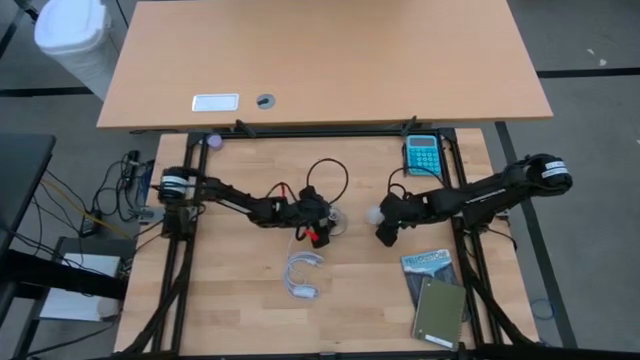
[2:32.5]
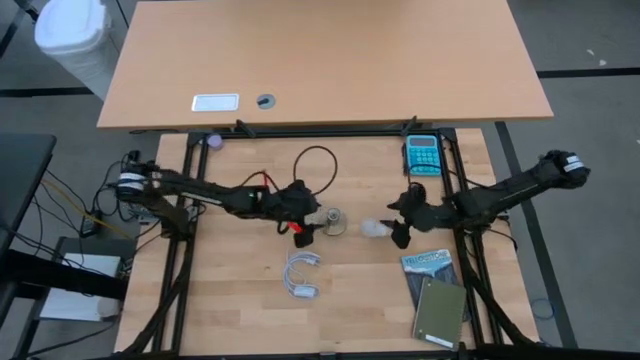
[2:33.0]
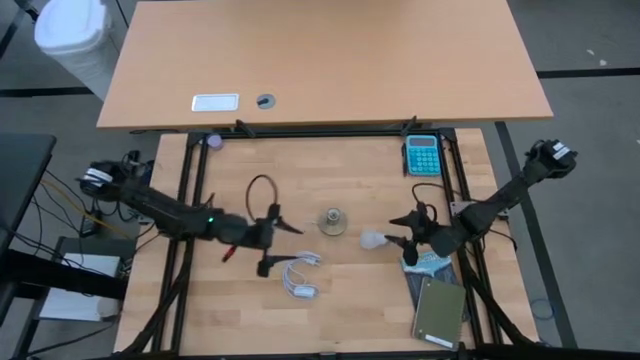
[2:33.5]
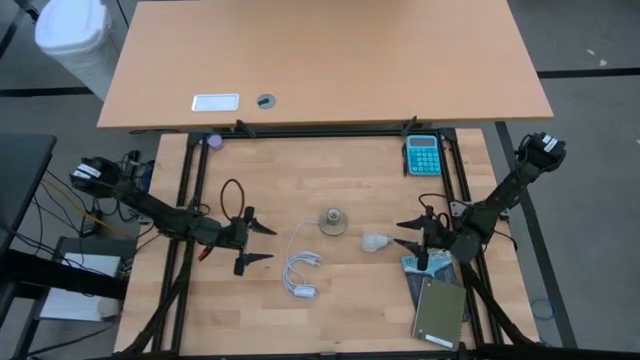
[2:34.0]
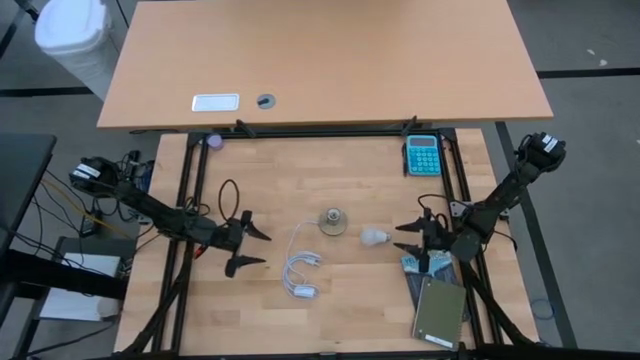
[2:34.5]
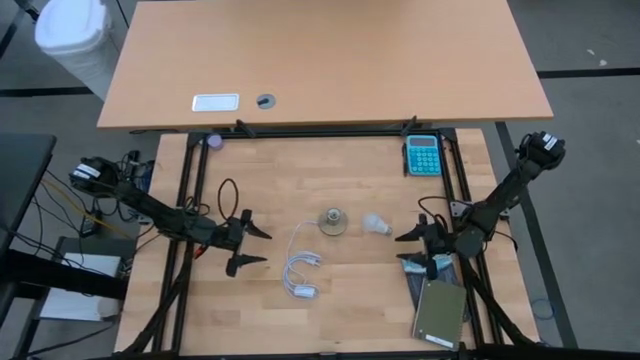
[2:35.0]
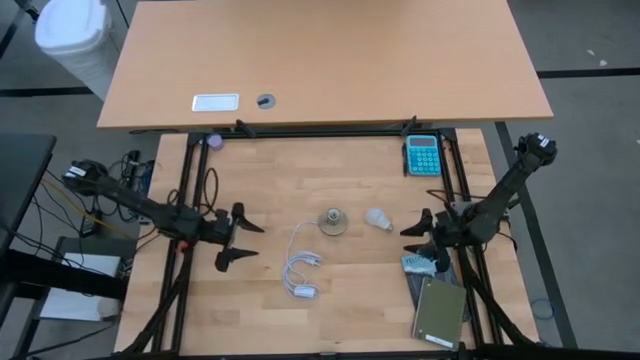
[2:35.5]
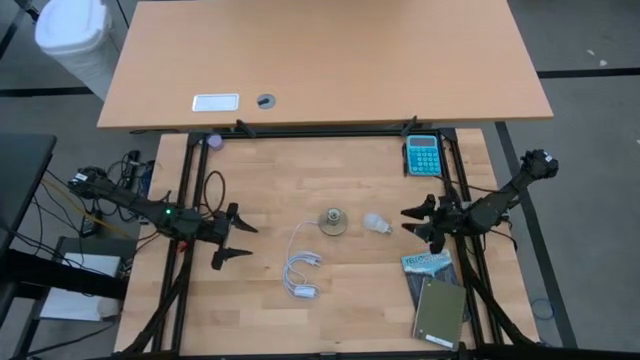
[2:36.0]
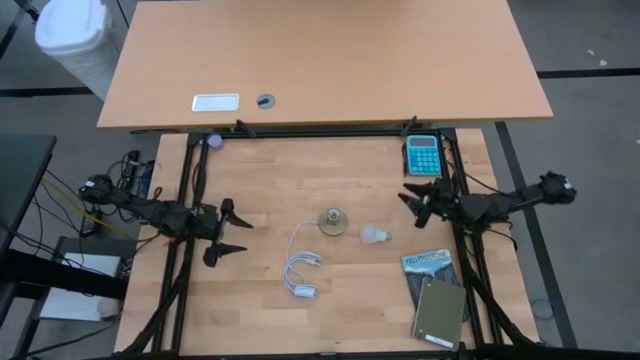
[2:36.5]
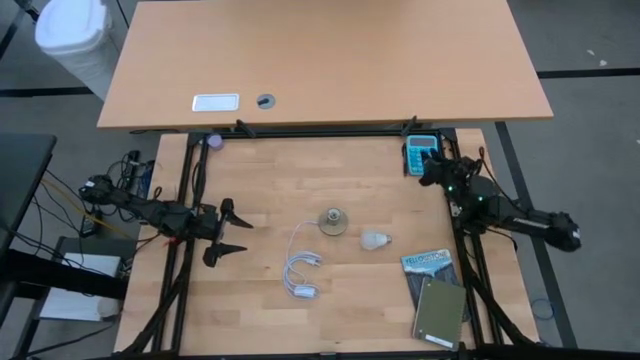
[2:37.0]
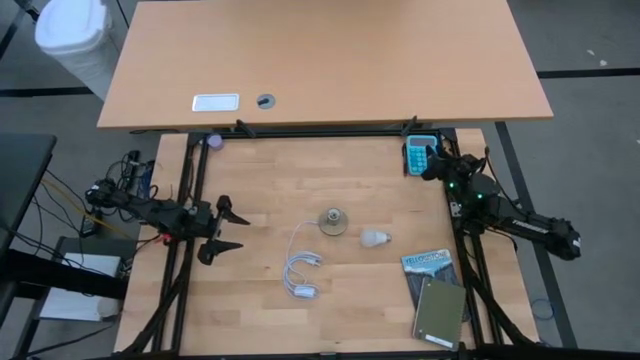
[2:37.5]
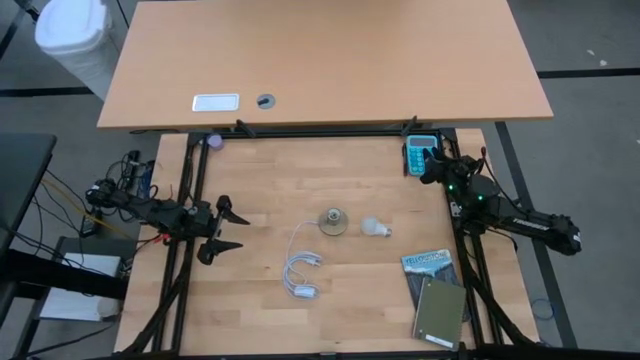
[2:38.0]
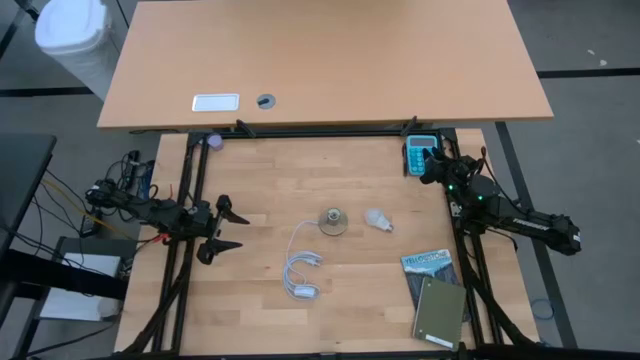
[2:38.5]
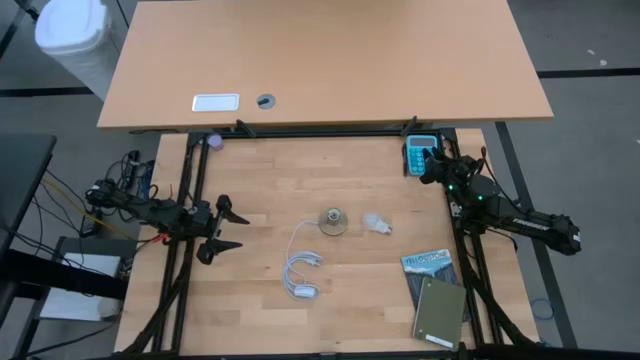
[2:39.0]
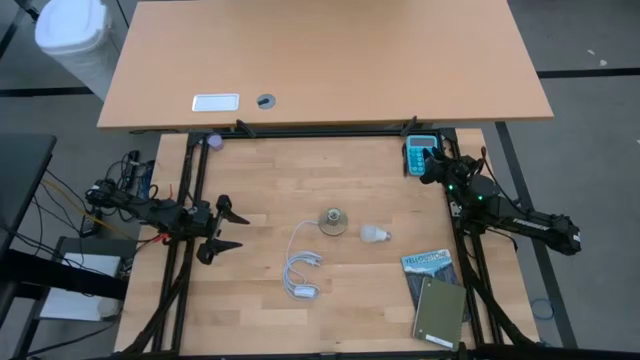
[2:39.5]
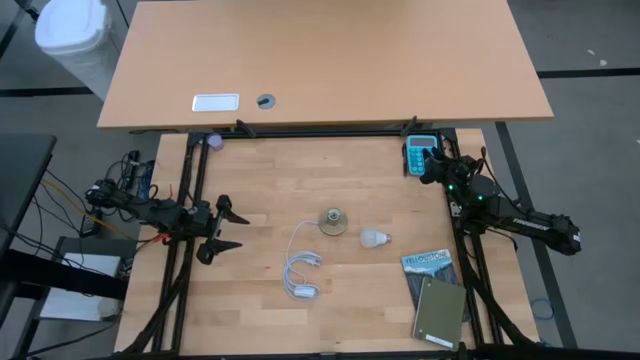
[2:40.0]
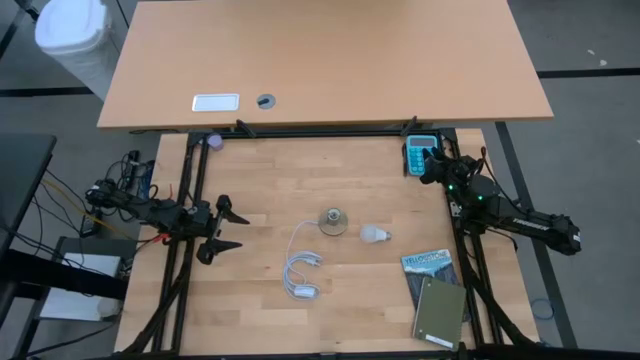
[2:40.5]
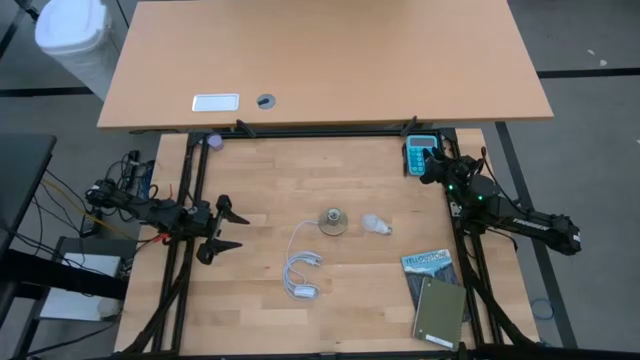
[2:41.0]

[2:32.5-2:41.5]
Task: Screw lightbulb
Return to Home Position

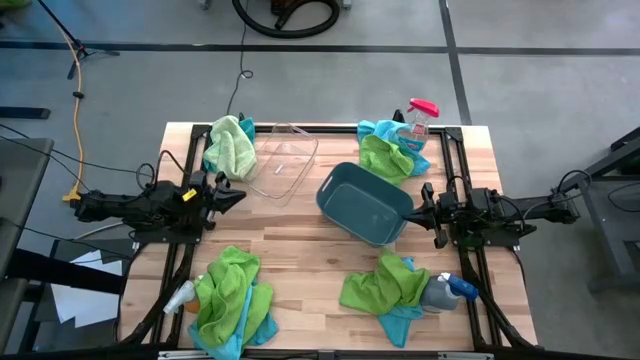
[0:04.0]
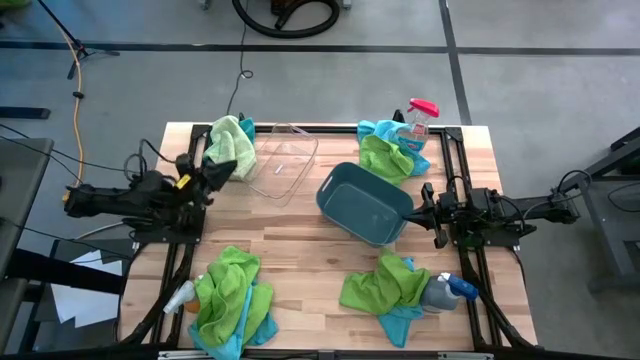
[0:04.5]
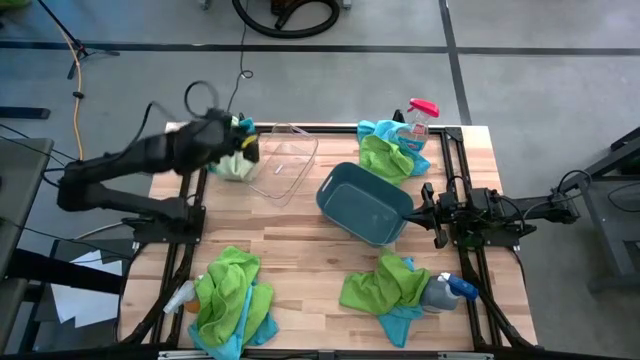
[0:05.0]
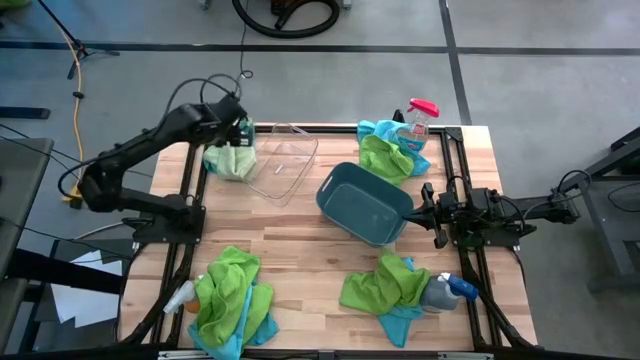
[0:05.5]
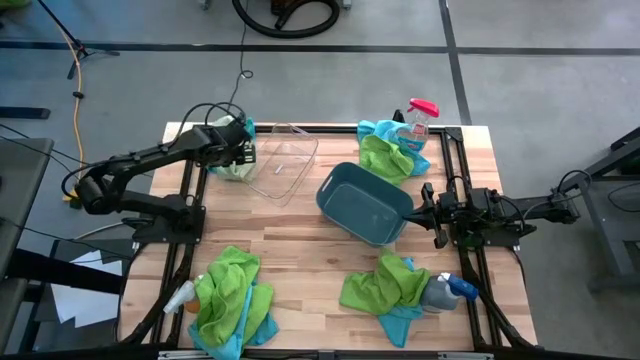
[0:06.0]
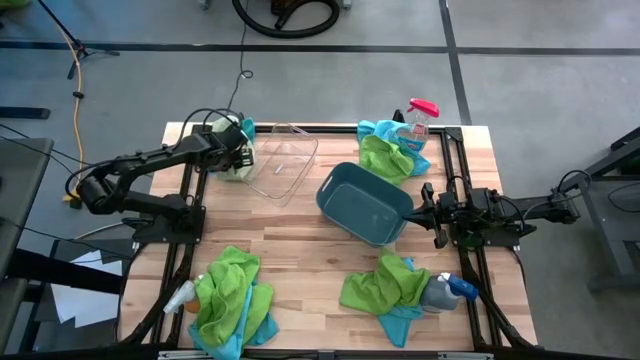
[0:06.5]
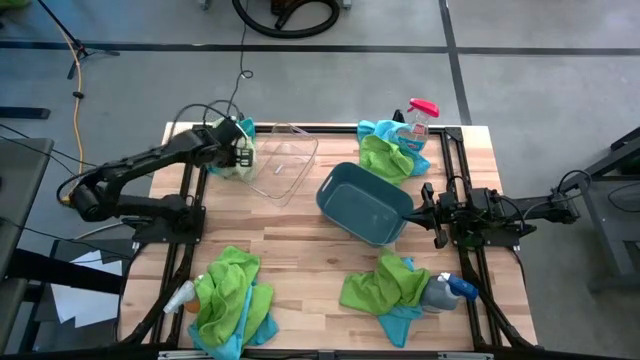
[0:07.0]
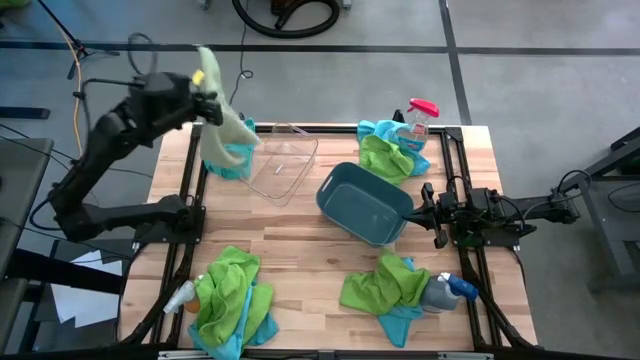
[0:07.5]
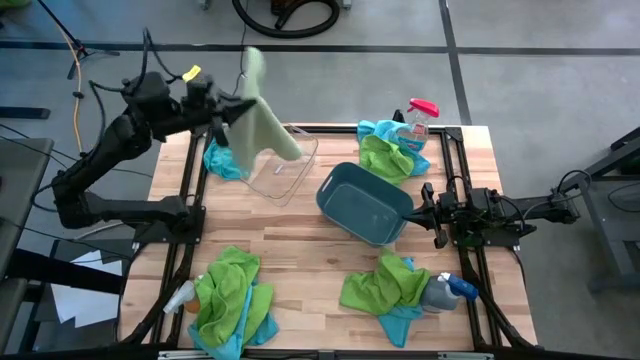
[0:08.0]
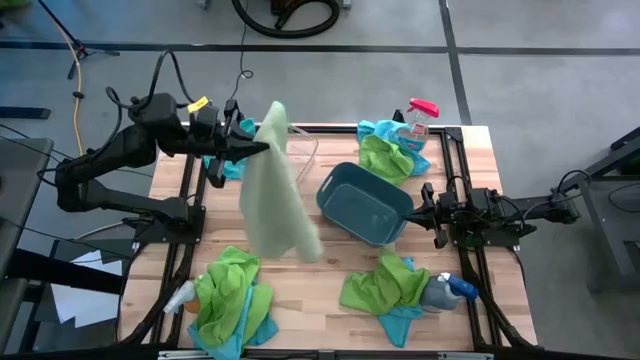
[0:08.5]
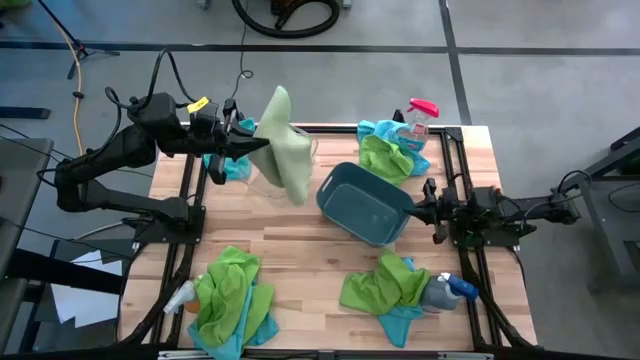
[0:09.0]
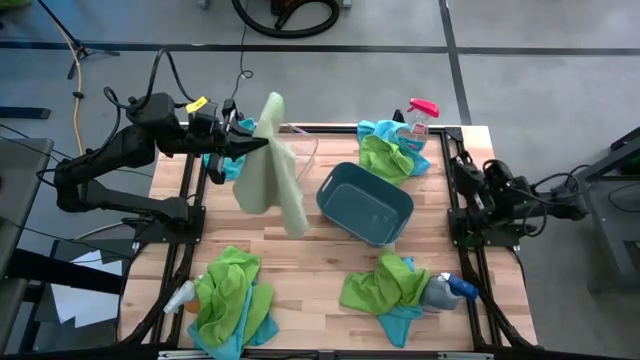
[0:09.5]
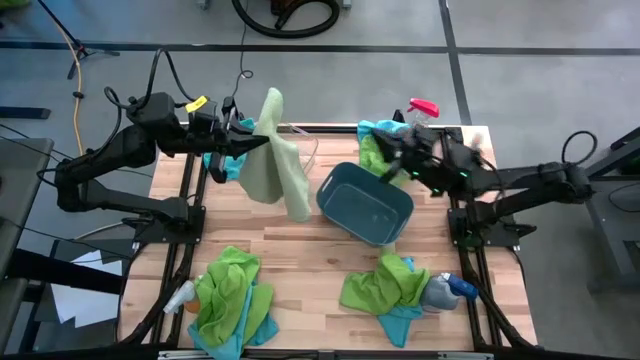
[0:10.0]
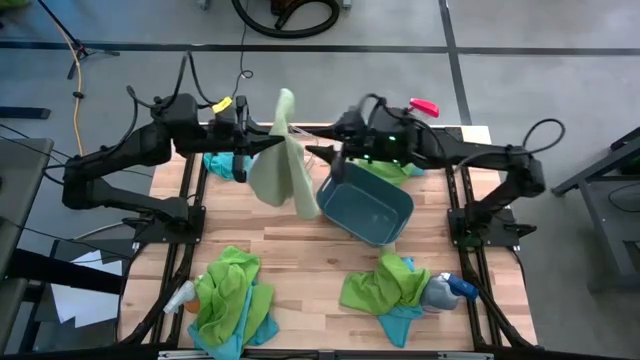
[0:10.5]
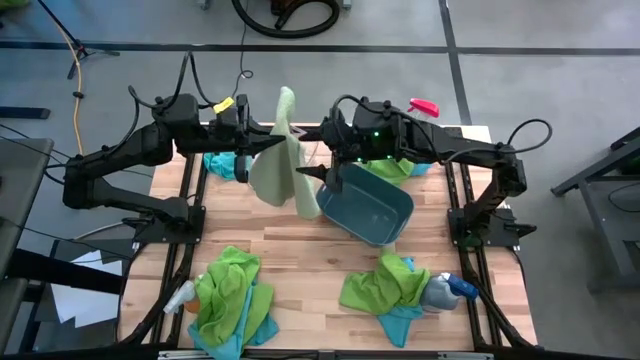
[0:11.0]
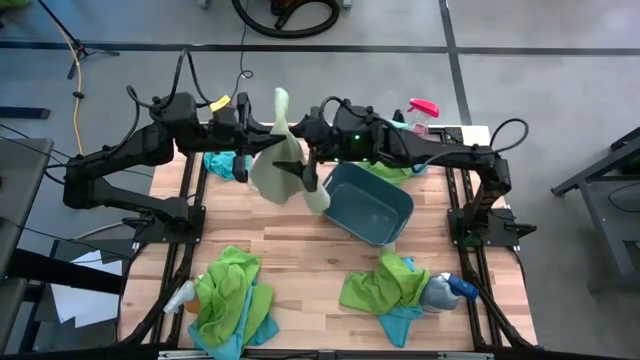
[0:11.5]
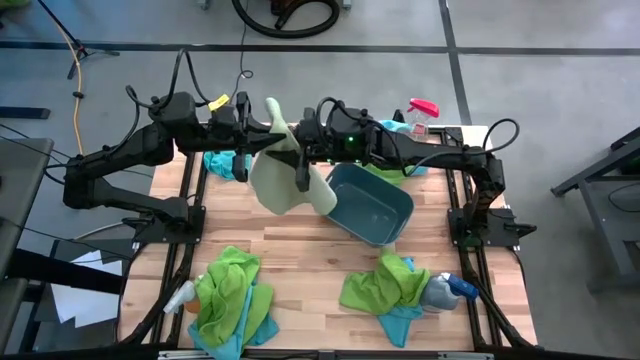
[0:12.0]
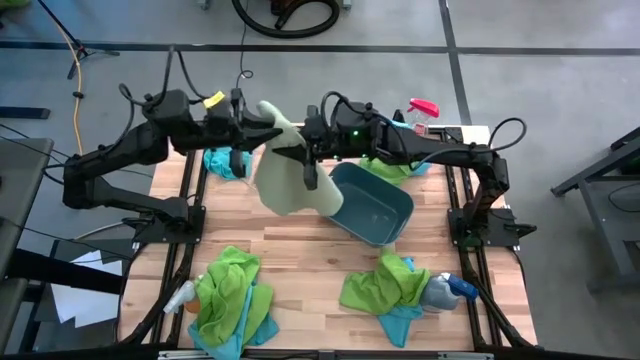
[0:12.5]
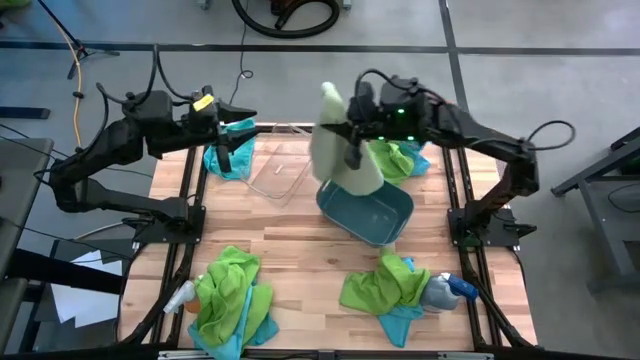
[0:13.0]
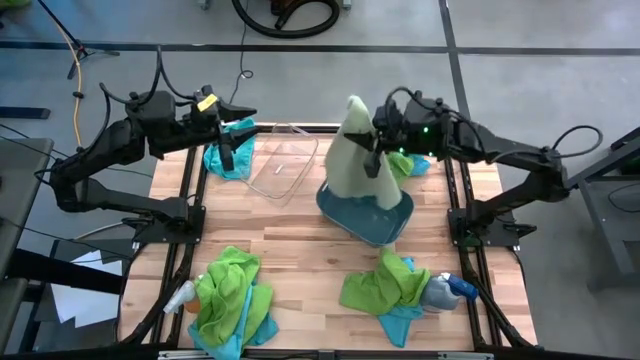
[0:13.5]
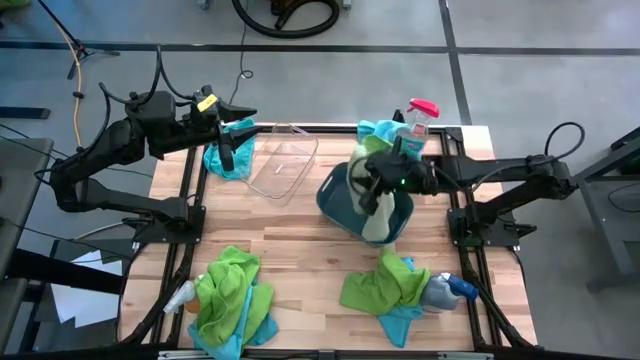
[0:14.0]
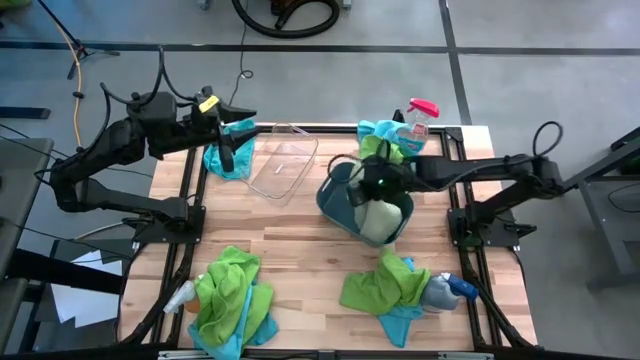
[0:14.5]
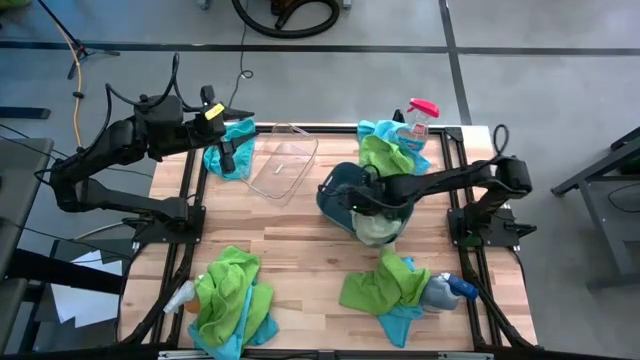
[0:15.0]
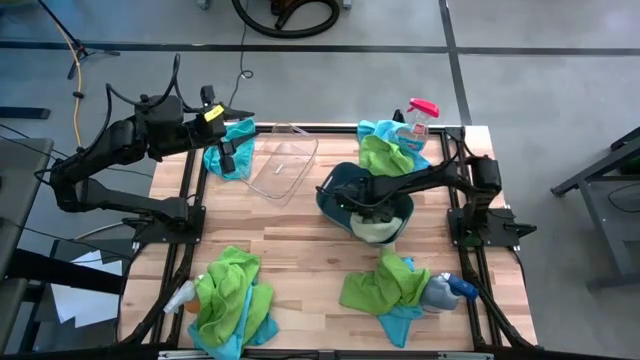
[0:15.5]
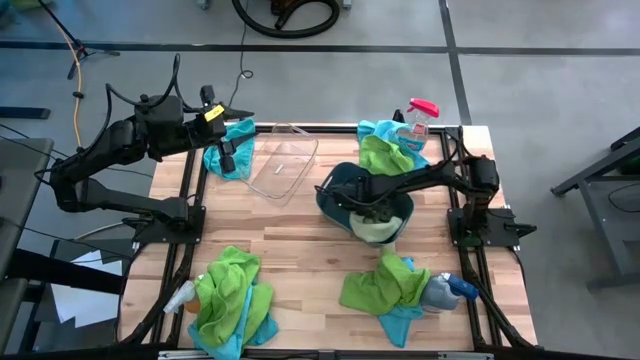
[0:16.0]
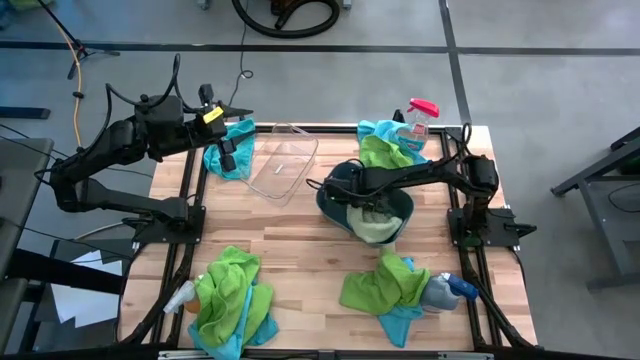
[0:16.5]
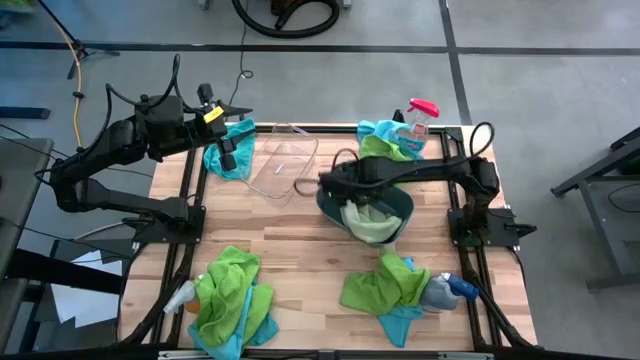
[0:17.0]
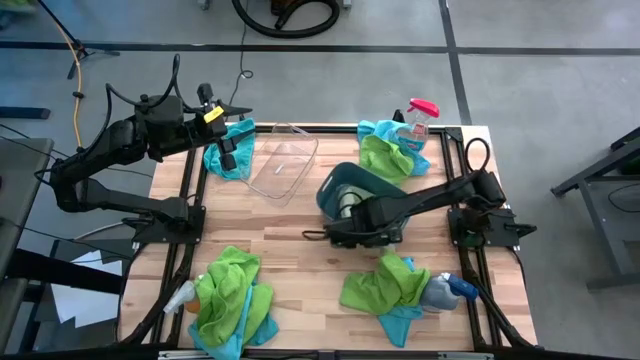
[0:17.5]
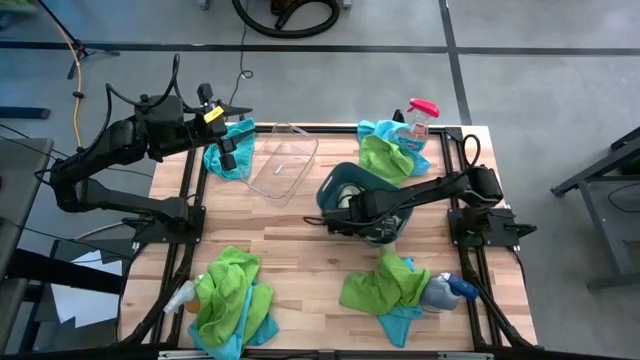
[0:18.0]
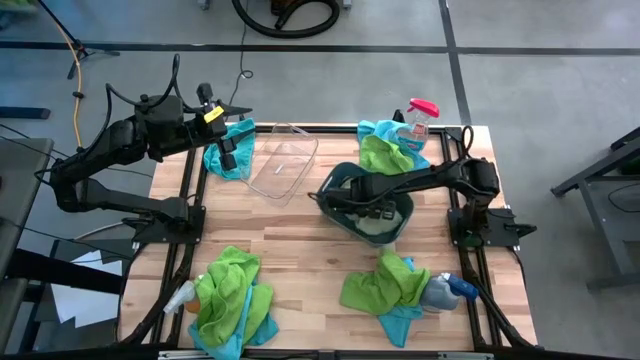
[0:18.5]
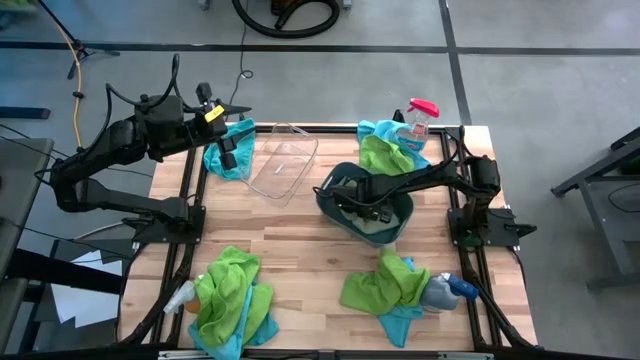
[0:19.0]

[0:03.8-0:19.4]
Task: Sort microfiber towel by color & place in baskets
Put the light green microfiber towel into the blue bin
